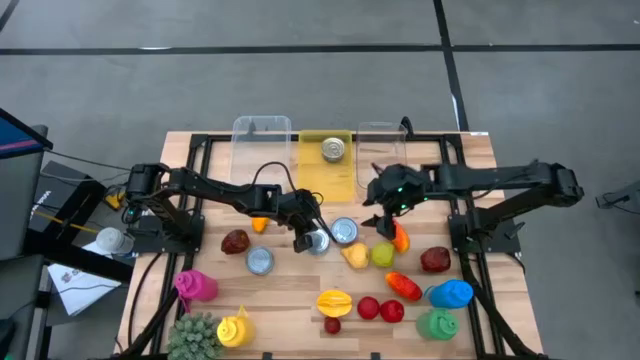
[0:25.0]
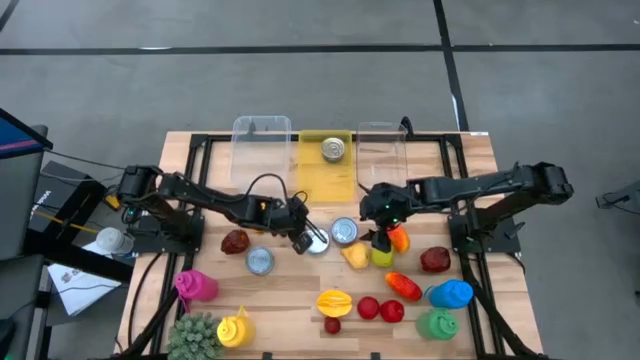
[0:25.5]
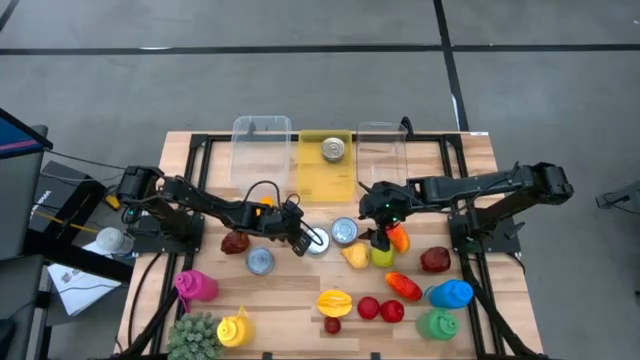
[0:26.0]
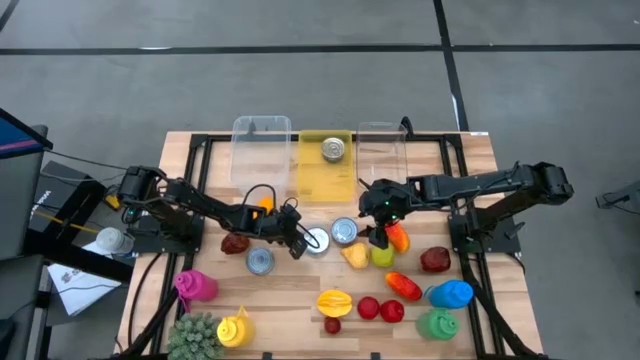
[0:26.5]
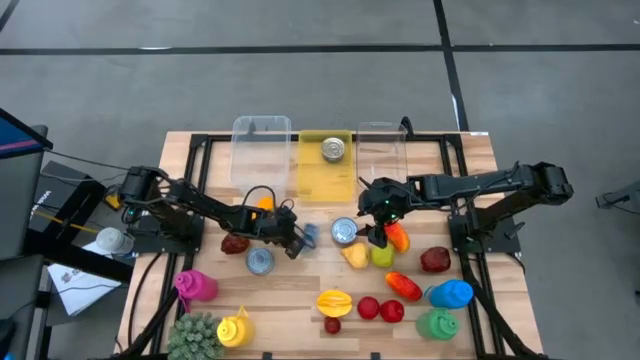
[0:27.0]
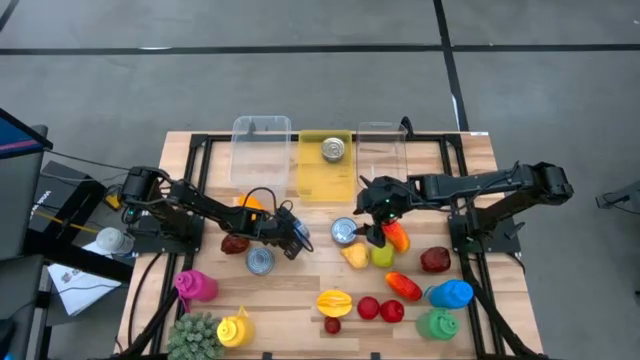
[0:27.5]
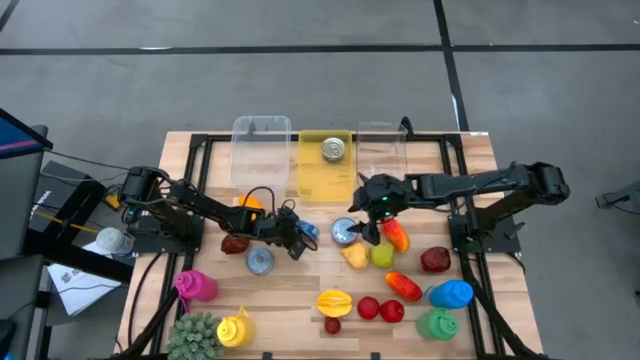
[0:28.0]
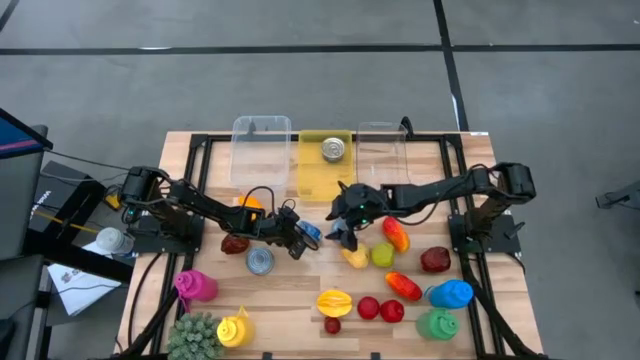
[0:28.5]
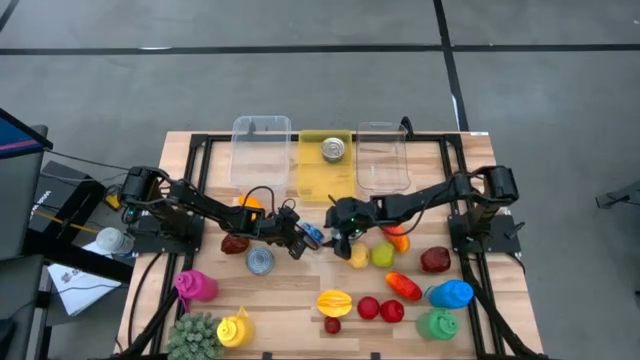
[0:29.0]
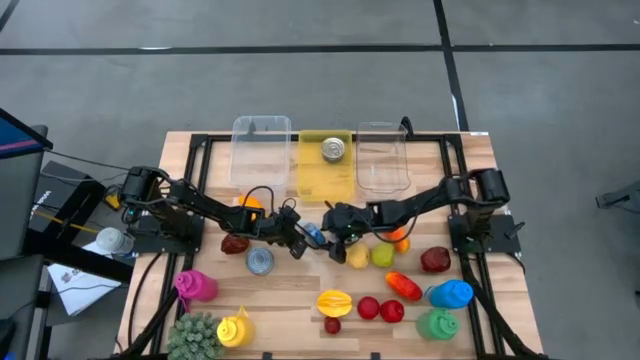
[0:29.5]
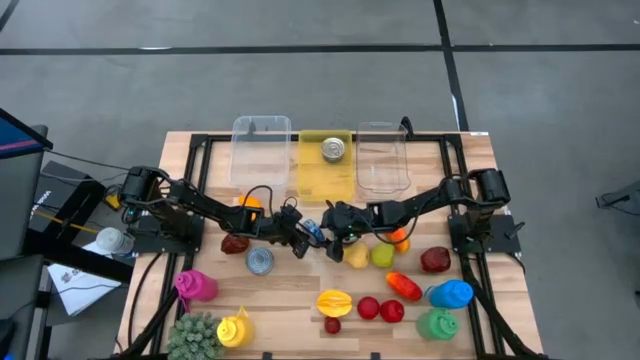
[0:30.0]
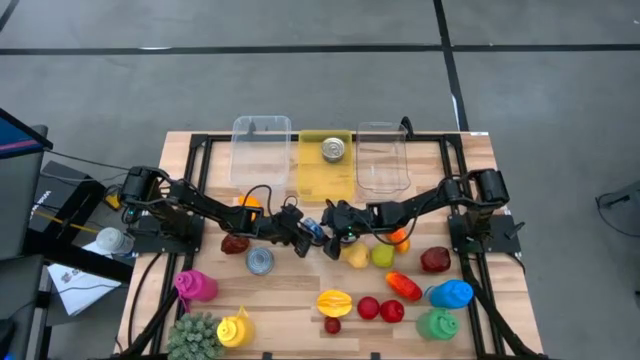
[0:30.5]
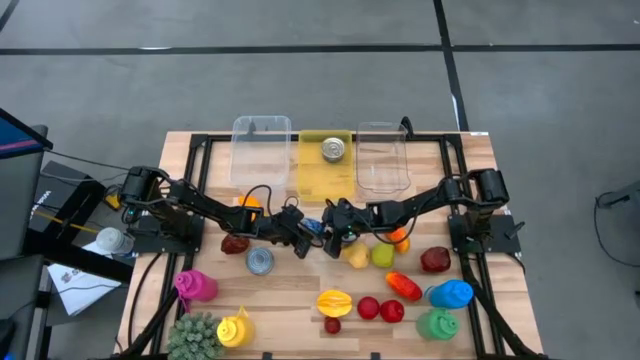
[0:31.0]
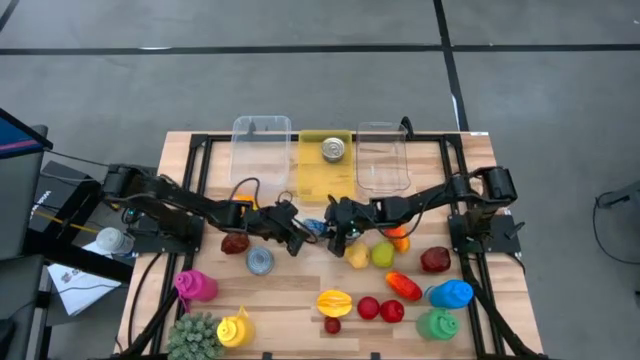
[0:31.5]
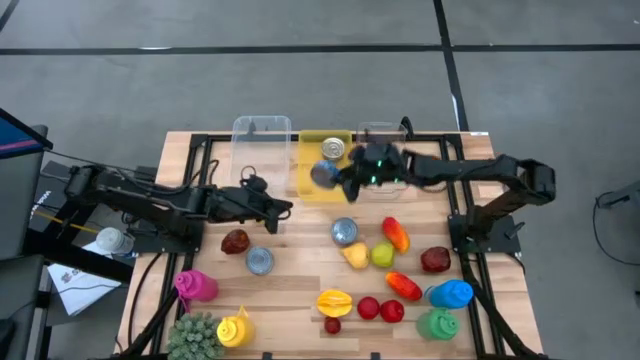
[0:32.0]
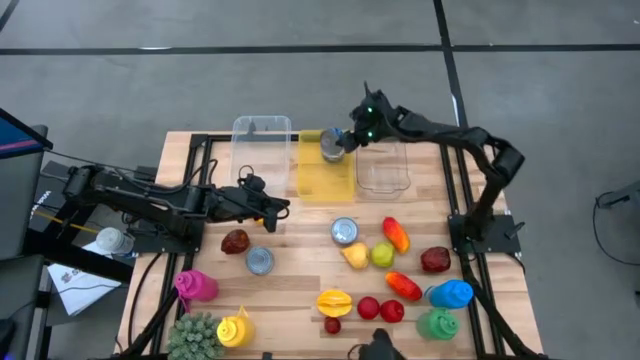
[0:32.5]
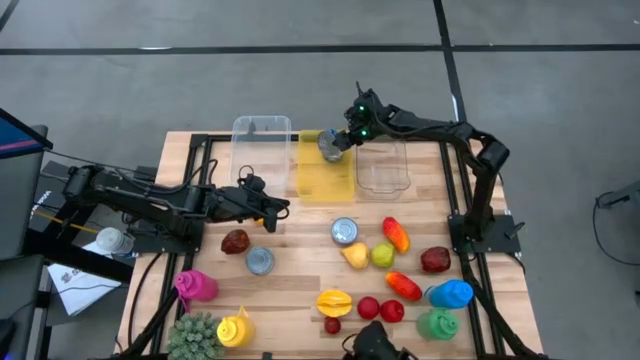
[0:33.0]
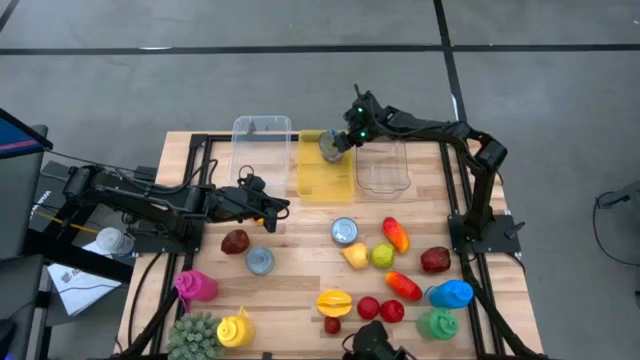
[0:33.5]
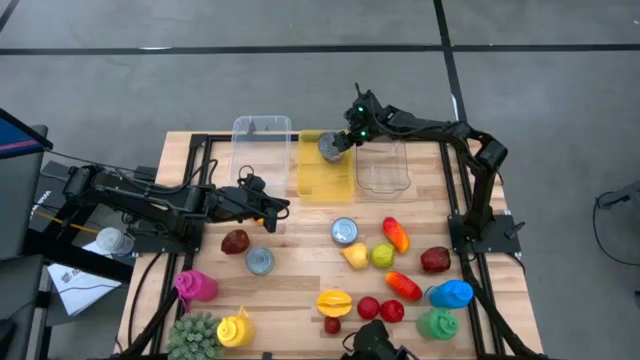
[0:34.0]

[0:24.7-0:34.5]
Task: Pick & Place Food Item
Put the blue tuna can into the yellow bin

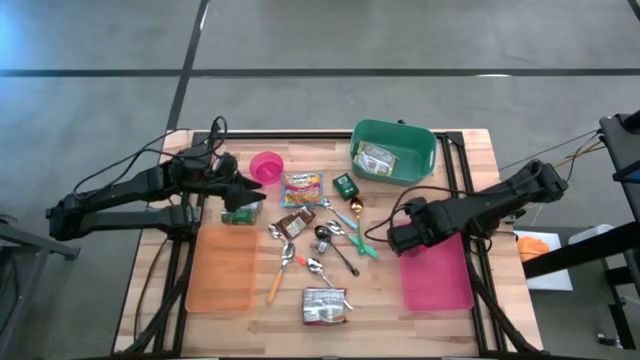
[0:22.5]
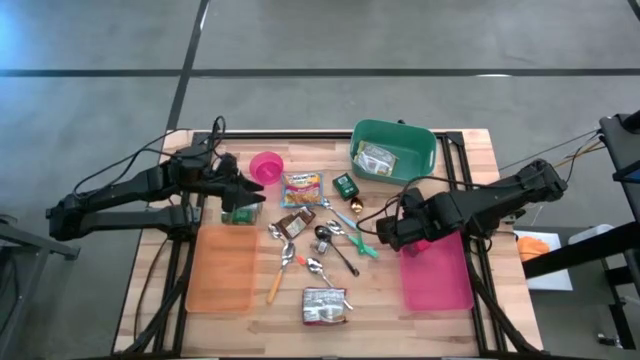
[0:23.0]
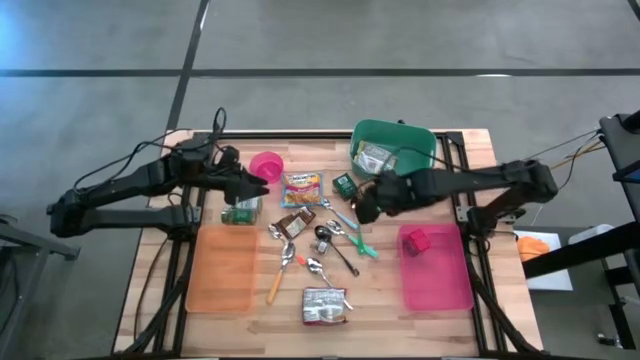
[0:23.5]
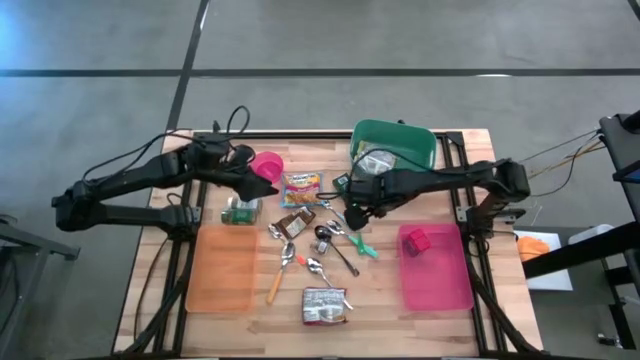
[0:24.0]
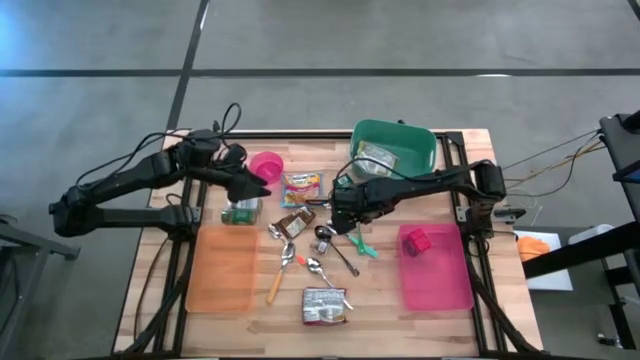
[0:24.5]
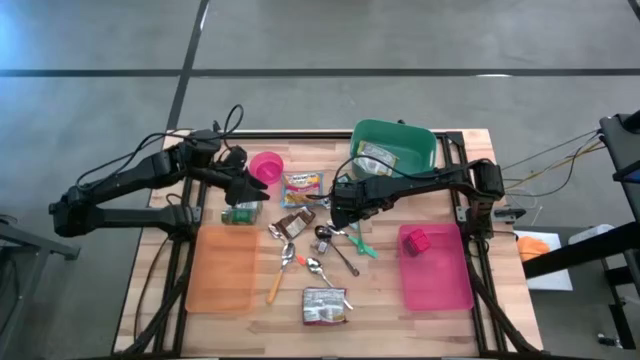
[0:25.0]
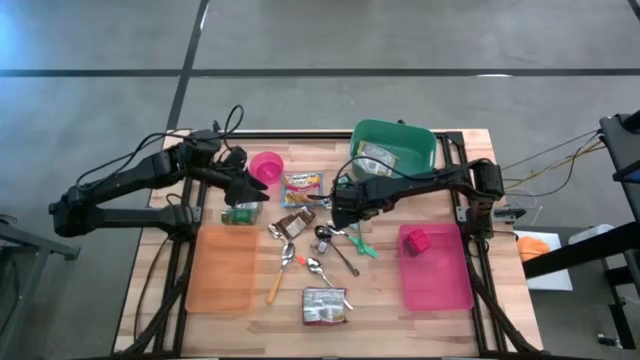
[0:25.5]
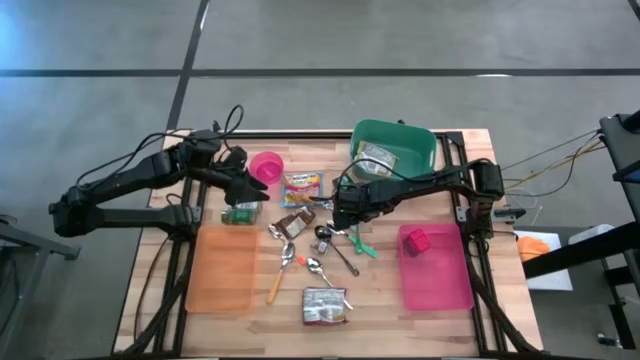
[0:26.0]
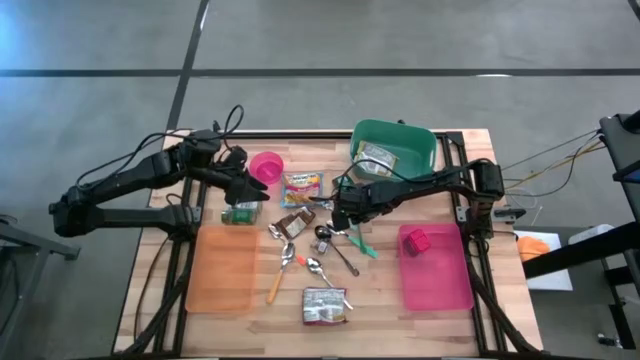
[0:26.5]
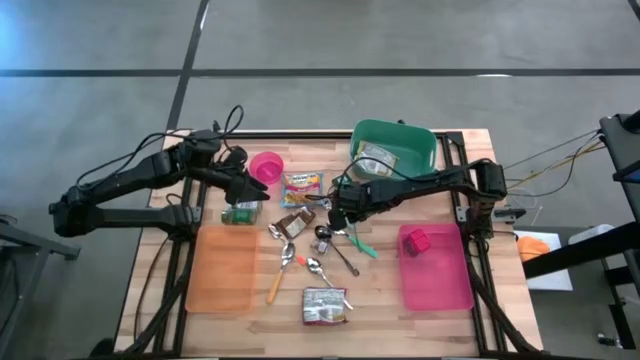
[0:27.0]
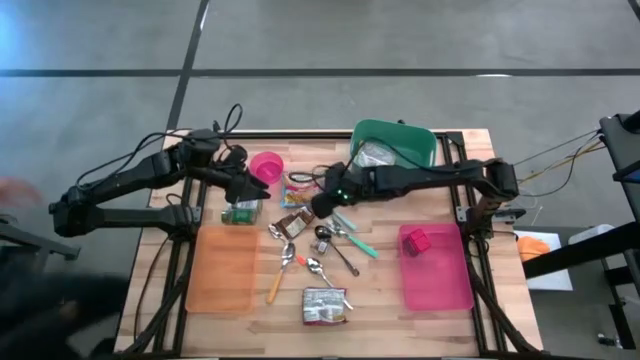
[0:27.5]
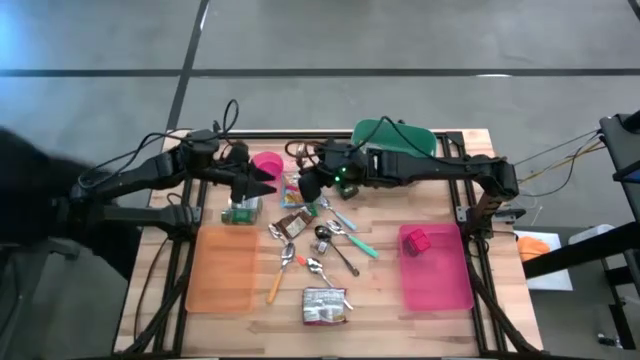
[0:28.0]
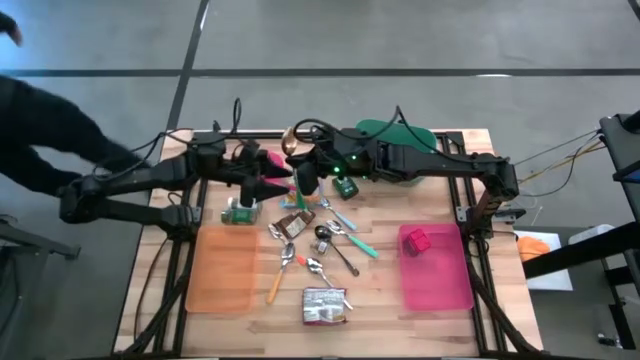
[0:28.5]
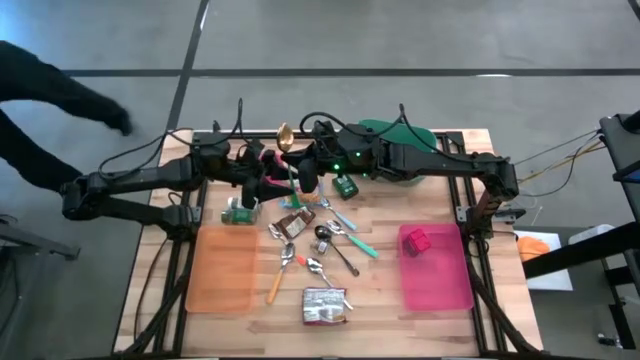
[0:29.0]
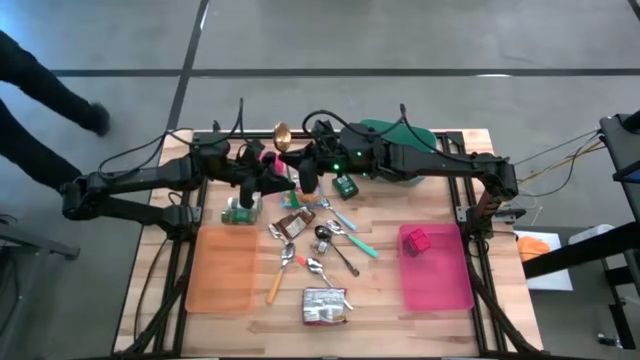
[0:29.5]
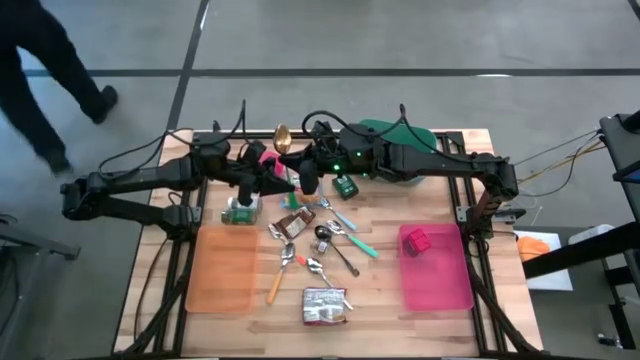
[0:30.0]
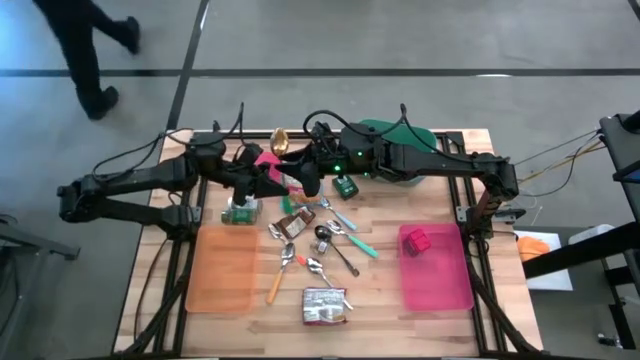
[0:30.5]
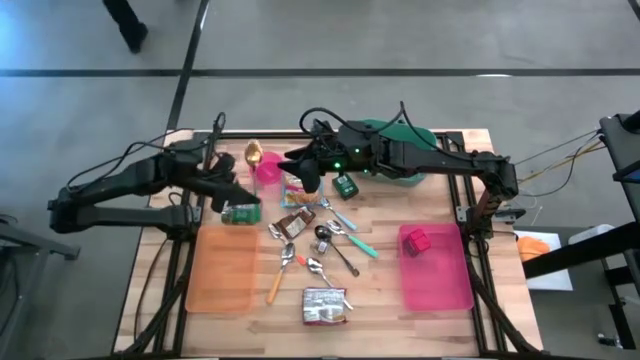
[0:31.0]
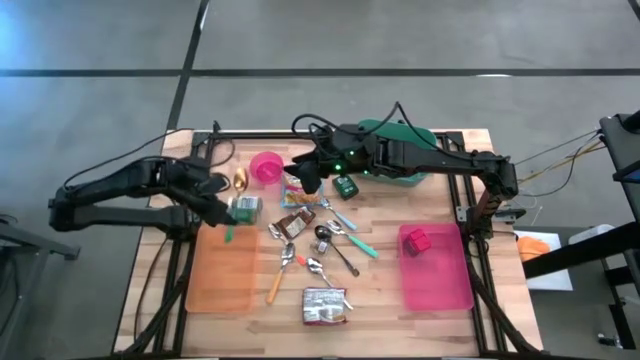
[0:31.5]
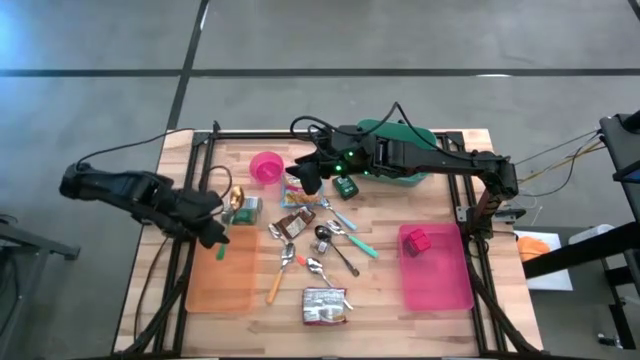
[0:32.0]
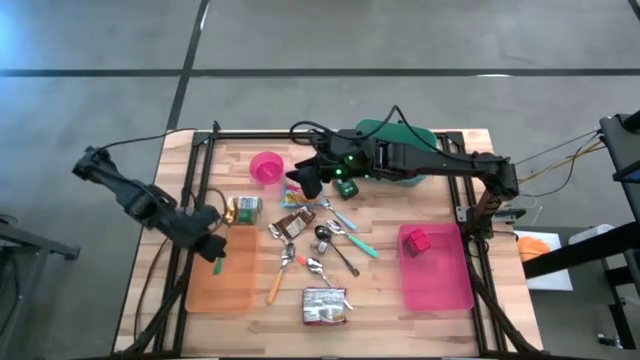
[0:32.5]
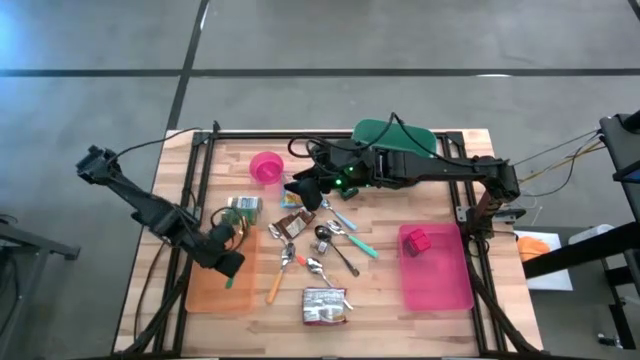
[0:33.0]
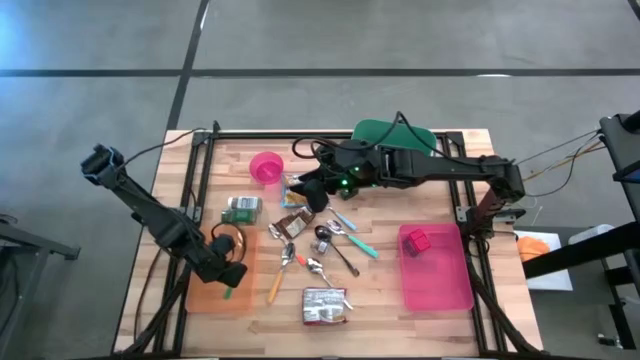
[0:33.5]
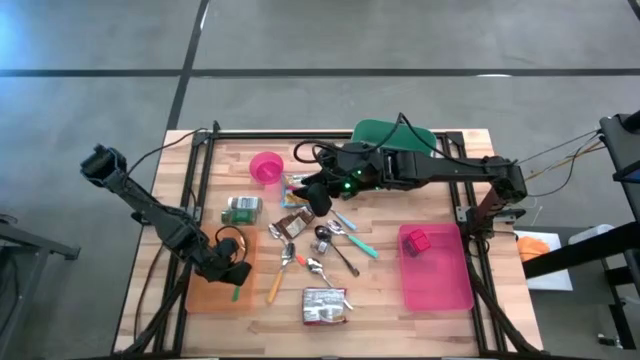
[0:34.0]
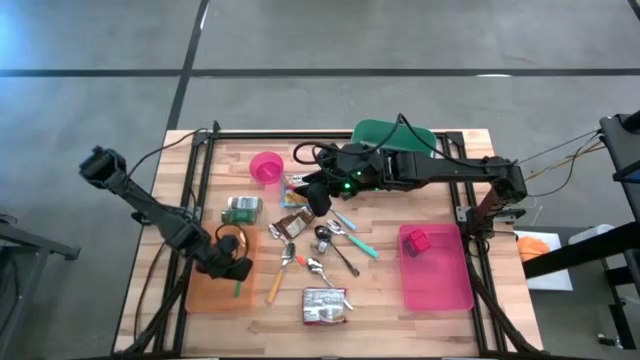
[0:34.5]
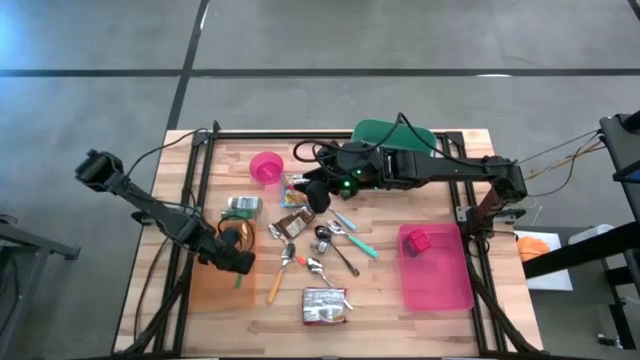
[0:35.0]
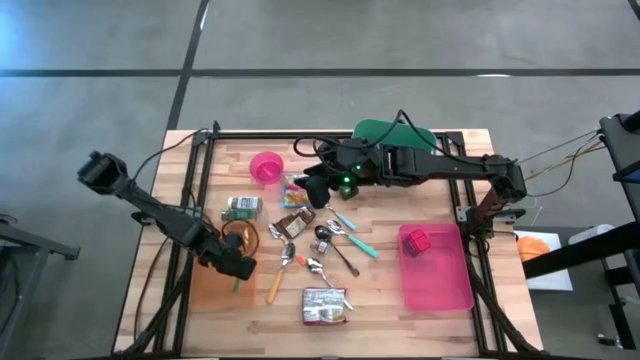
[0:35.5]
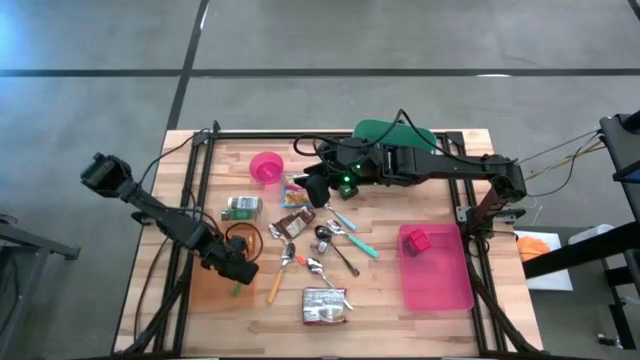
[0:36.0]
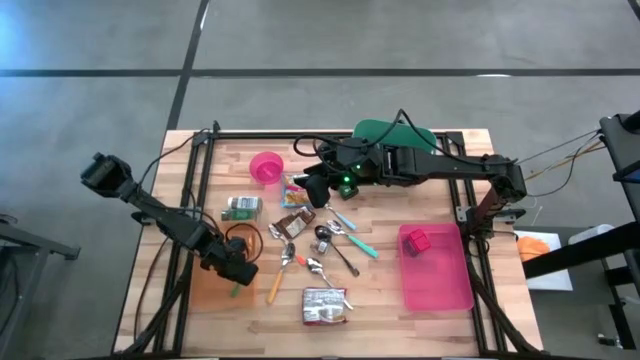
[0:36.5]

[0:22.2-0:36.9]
Task: Pick & Place Food Item
Put the green spoon into the orange bin
